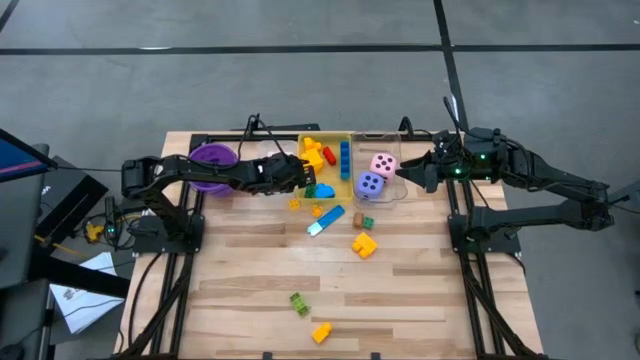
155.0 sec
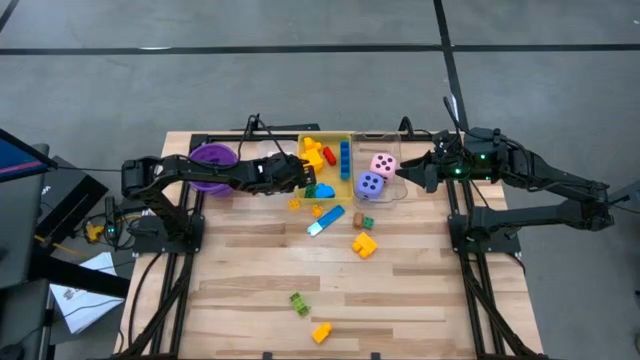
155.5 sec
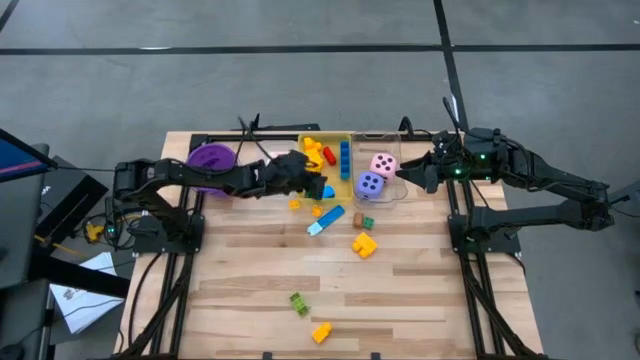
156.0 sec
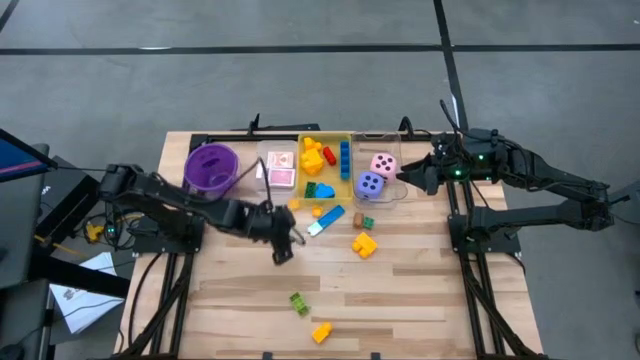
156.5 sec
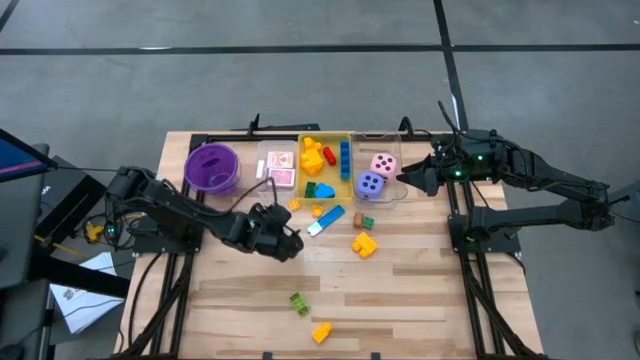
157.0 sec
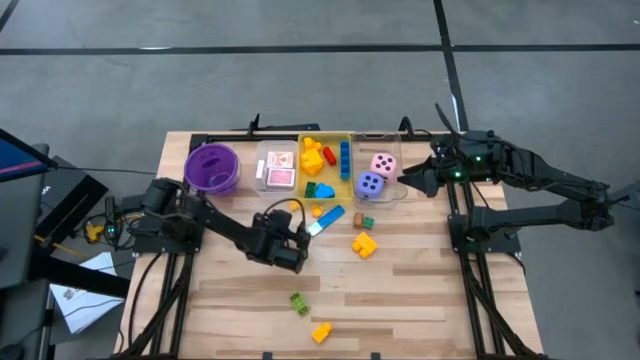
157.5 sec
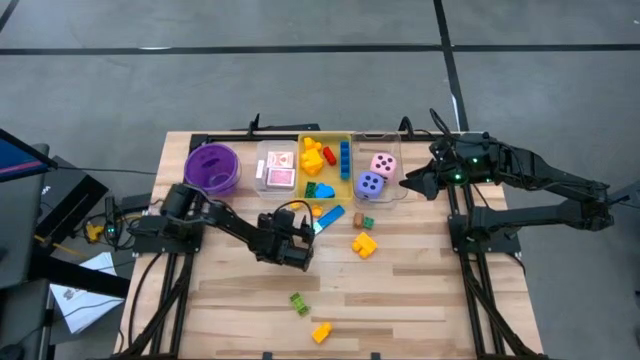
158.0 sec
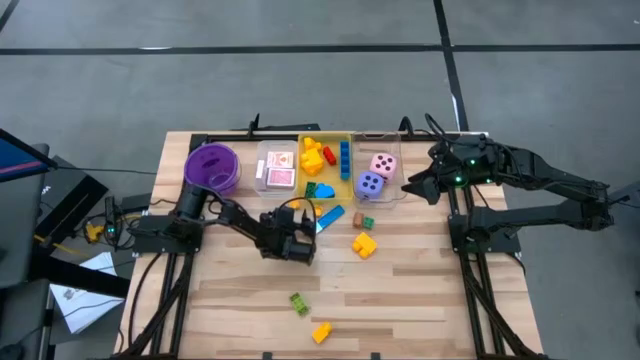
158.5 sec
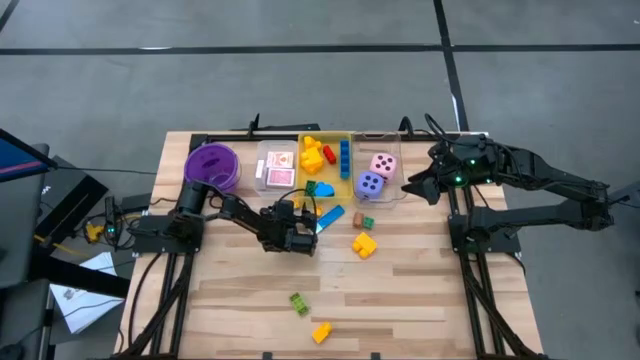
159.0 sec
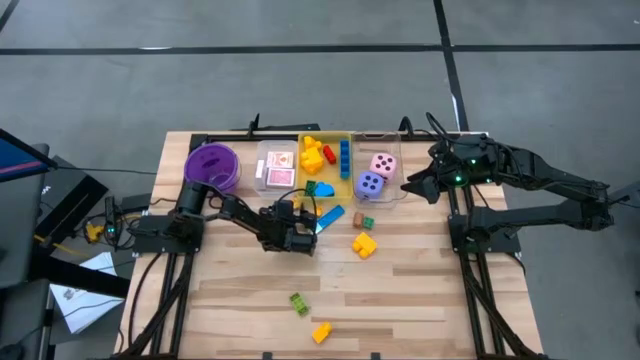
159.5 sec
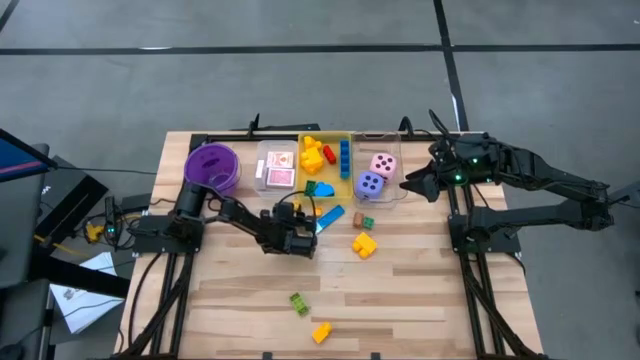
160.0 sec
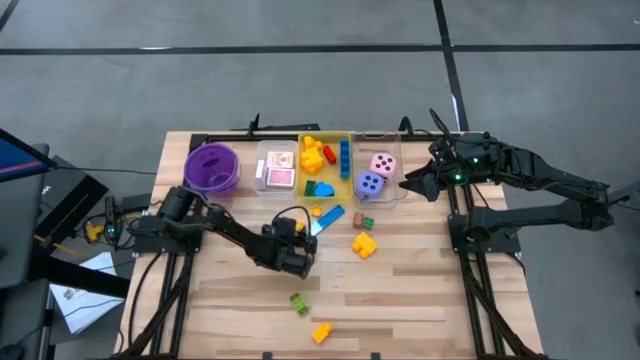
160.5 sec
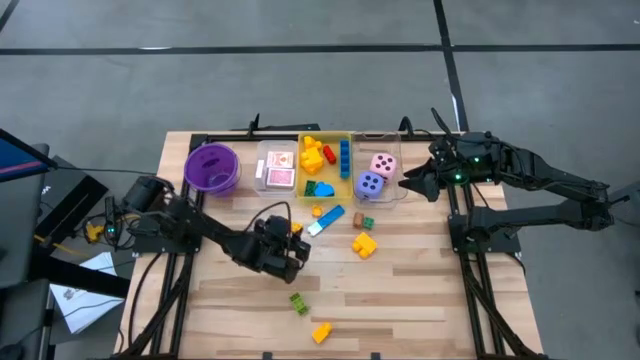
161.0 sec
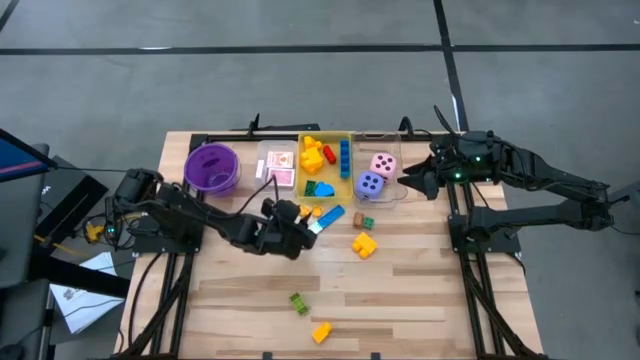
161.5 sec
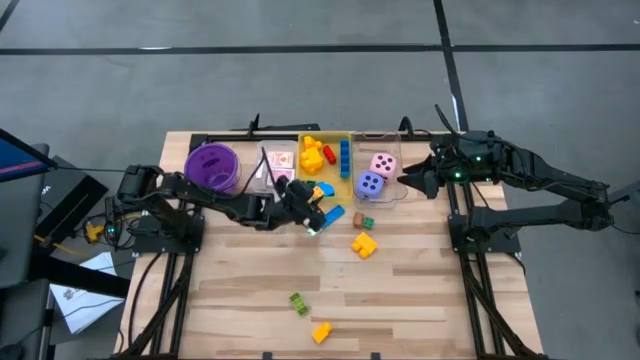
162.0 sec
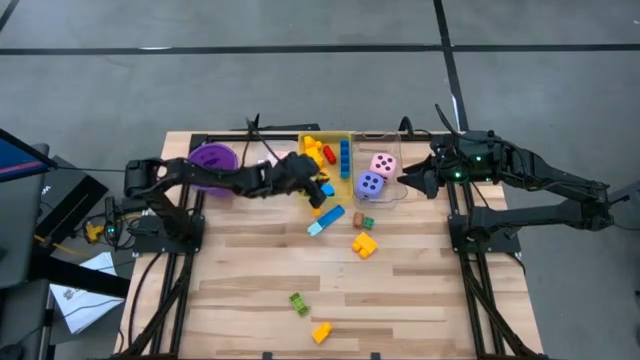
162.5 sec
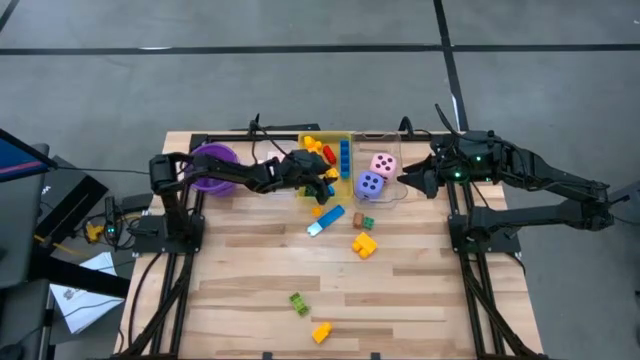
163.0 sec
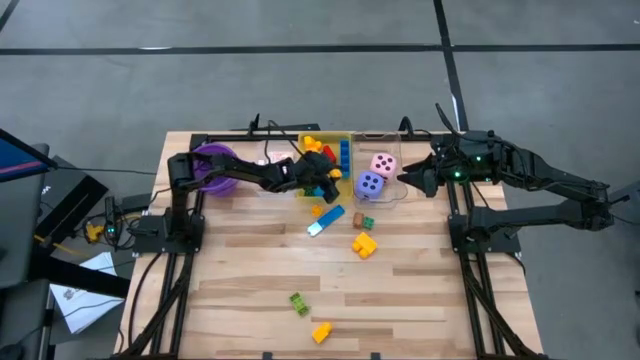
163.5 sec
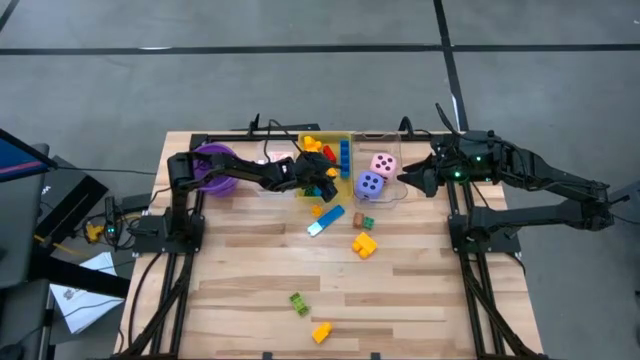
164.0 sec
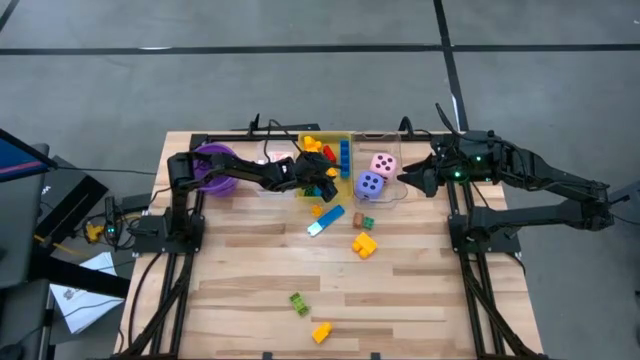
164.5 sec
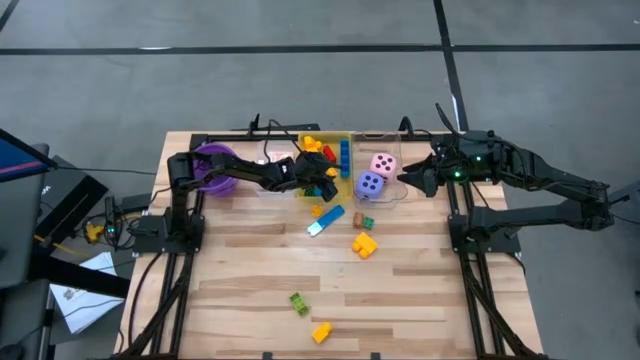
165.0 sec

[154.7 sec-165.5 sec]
Task: Pick & Place Toys
Put the yellow gamepiece into the yellow bin

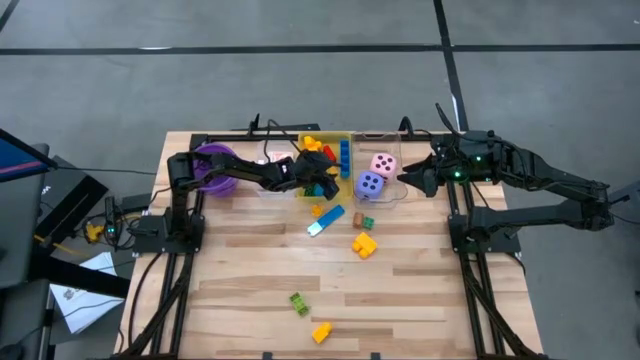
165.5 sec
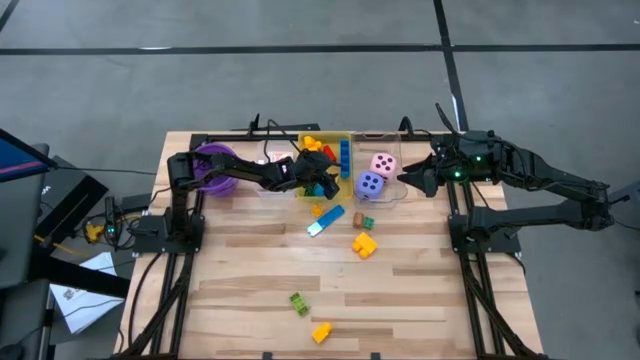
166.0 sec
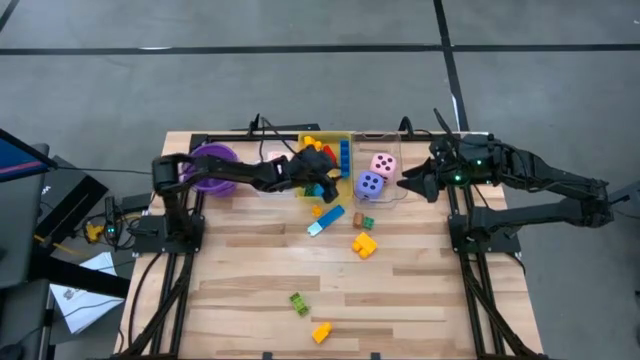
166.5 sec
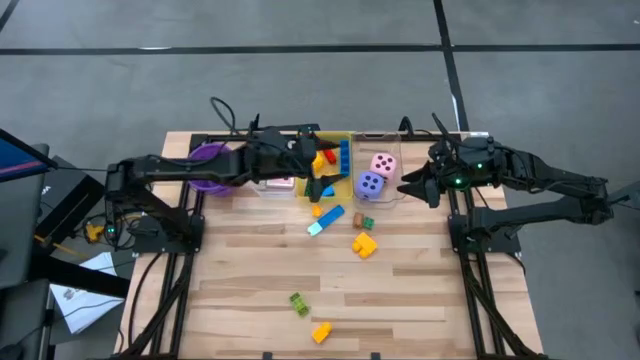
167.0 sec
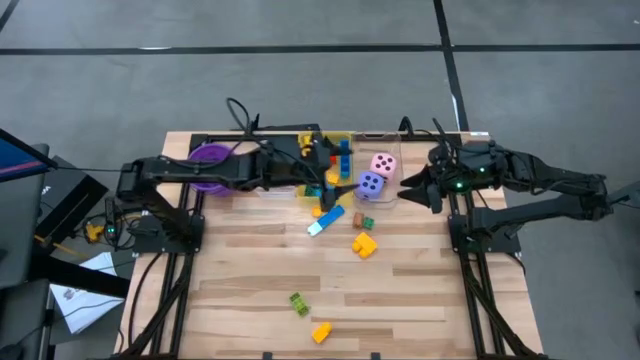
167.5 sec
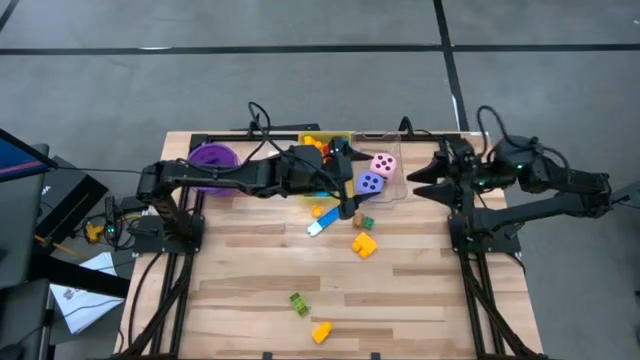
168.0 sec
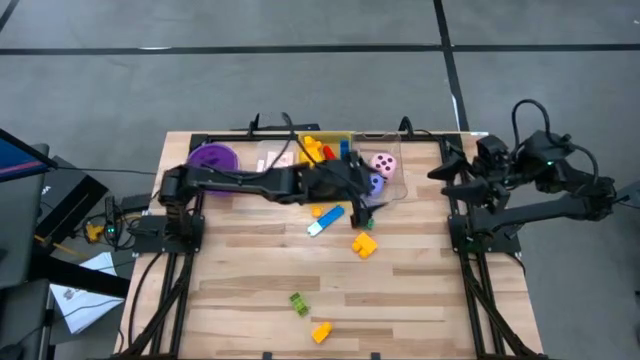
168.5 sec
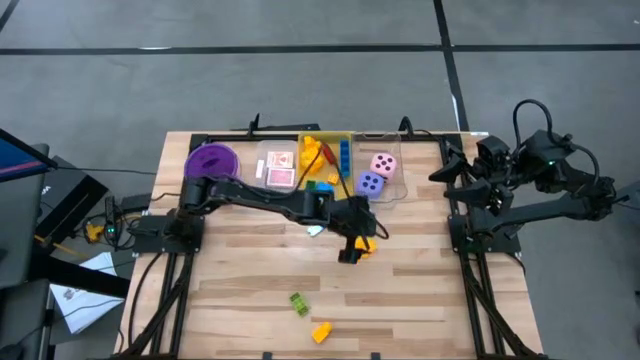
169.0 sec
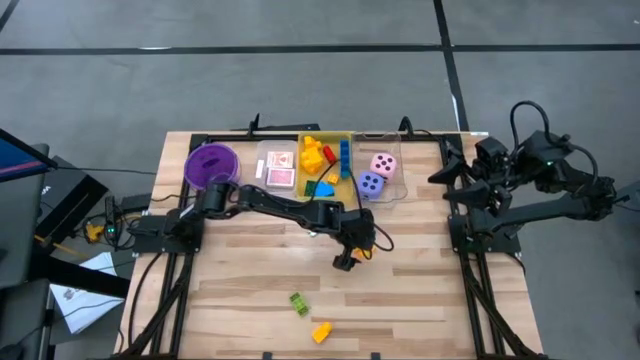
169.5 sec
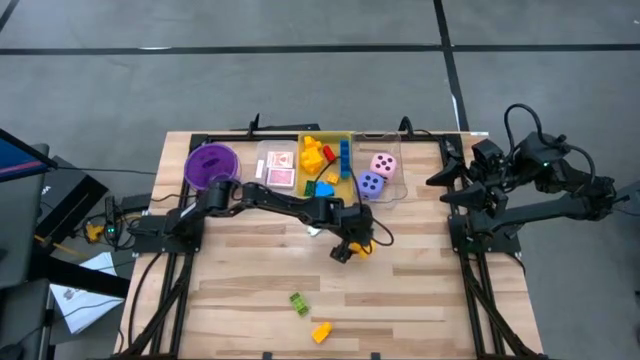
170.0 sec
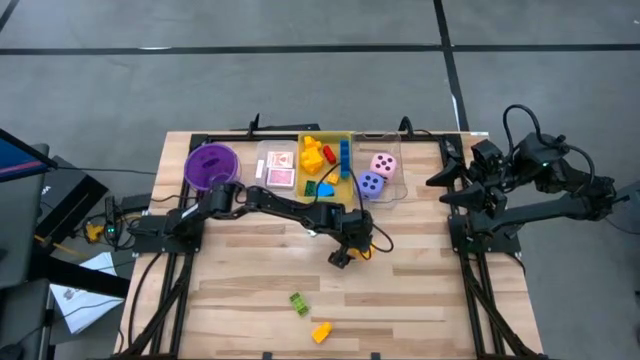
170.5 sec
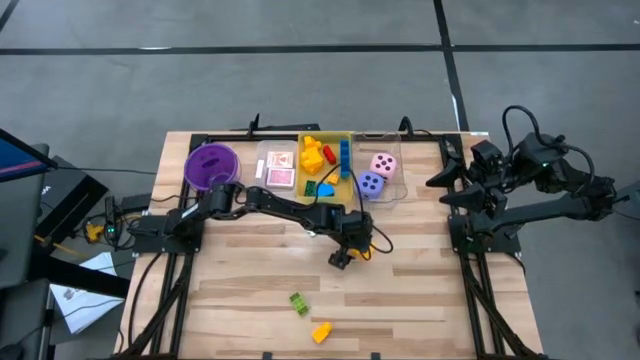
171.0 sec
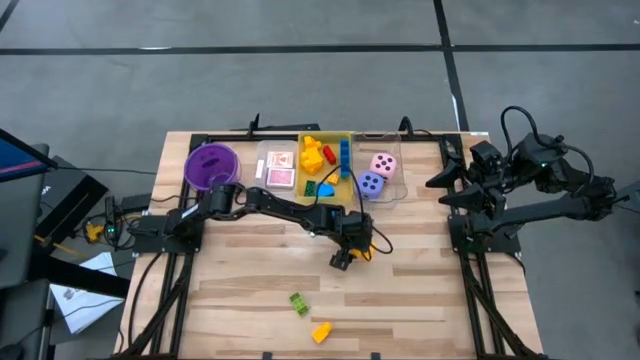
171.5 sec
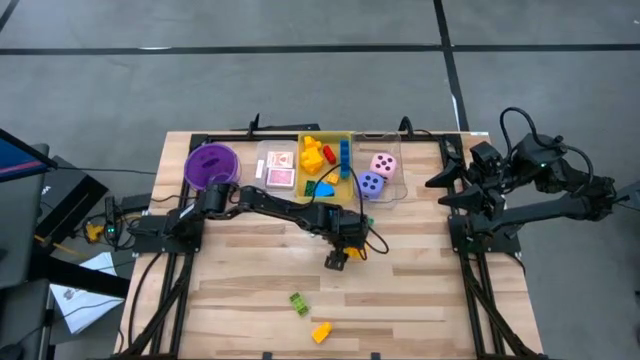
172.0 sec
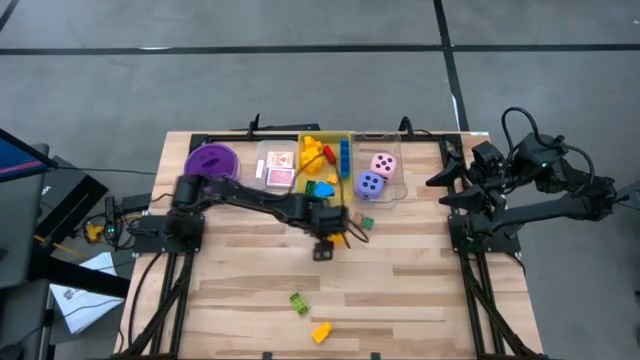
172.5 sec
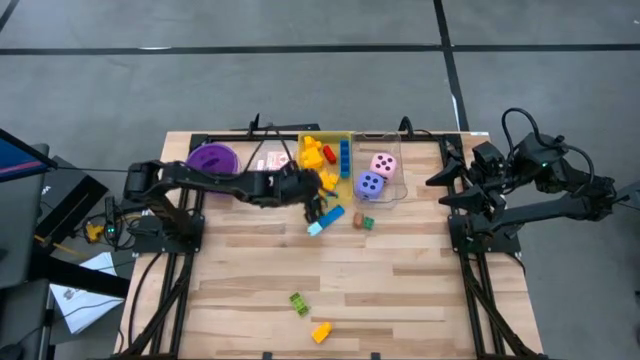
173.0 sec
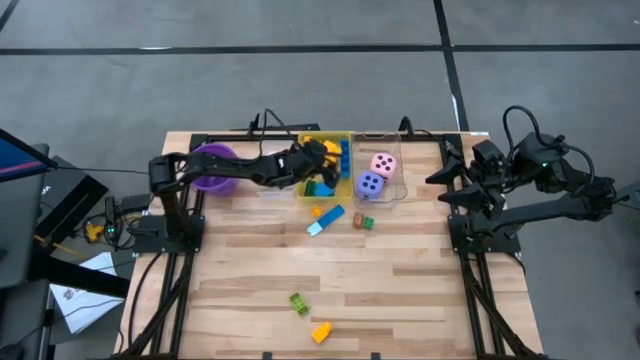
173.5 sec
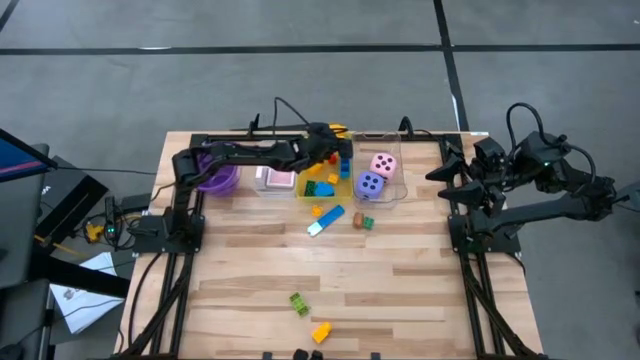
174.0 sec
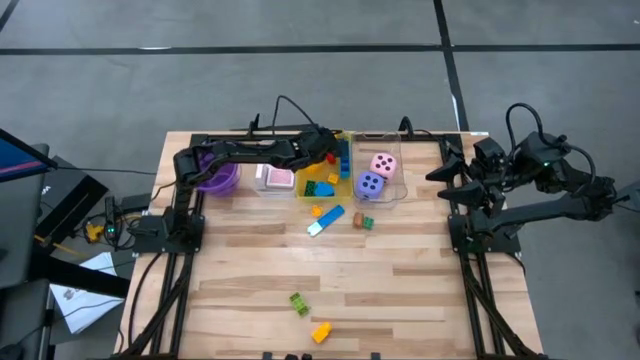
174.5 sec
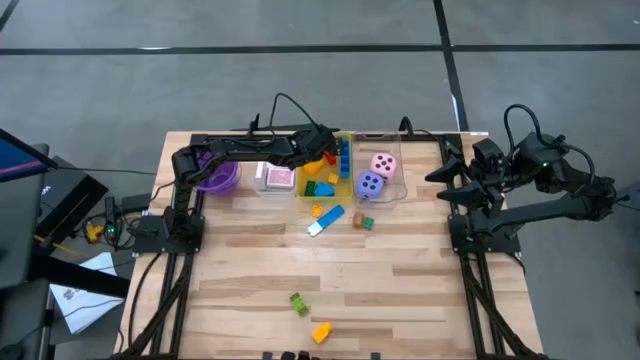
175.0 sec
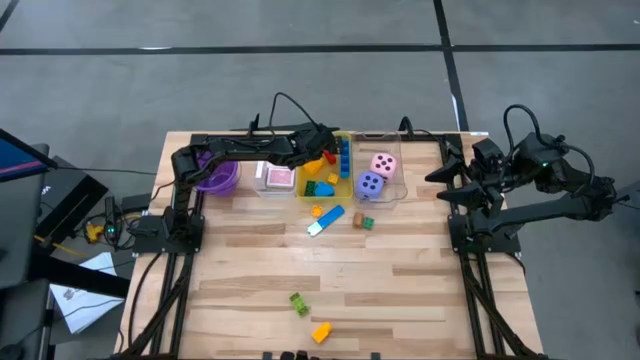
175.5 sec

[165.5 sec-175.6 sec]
Put the yellow gamepiece into the yellow bin
